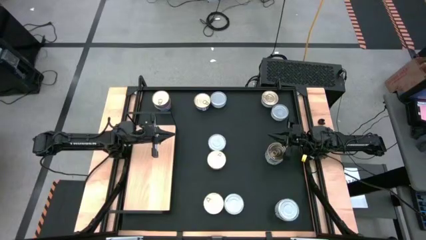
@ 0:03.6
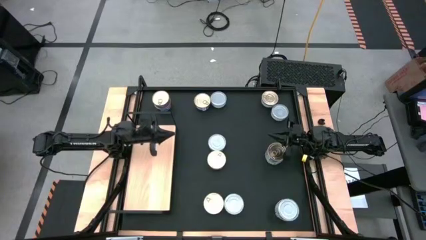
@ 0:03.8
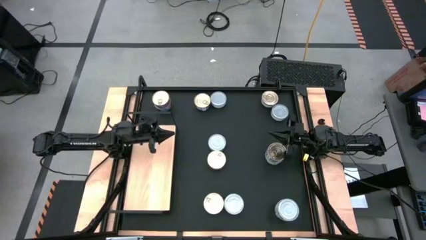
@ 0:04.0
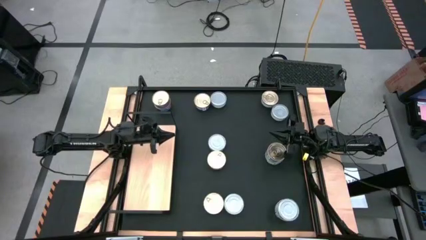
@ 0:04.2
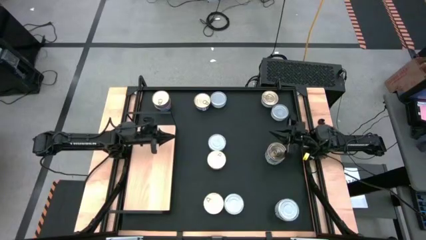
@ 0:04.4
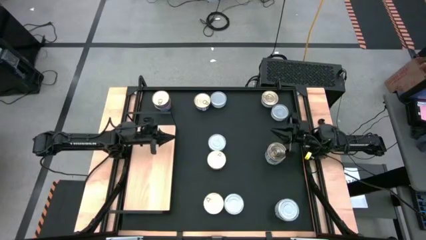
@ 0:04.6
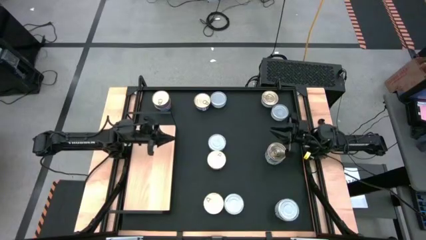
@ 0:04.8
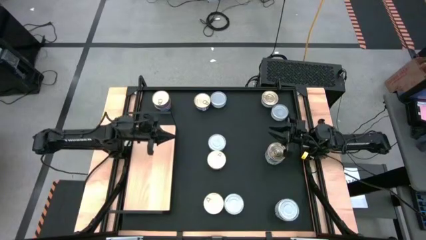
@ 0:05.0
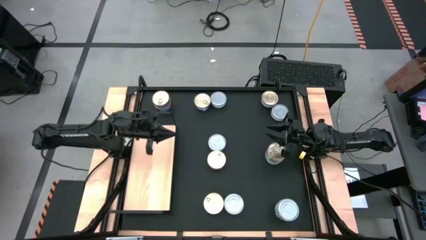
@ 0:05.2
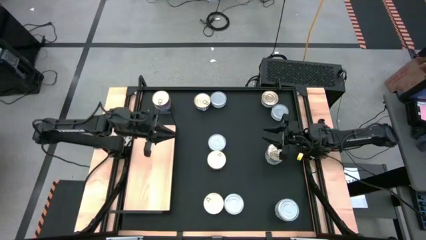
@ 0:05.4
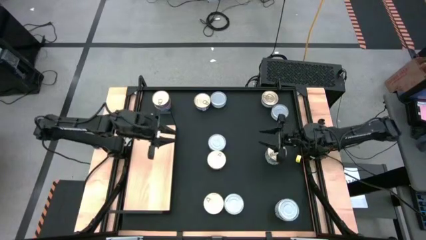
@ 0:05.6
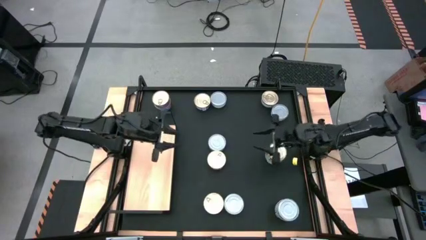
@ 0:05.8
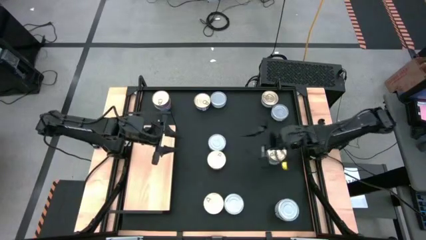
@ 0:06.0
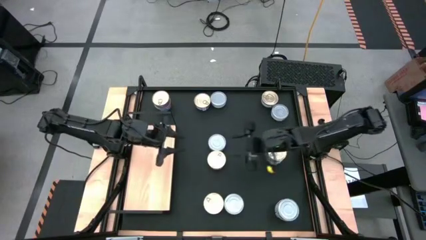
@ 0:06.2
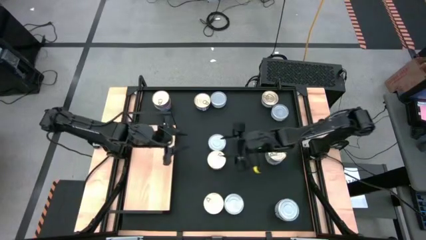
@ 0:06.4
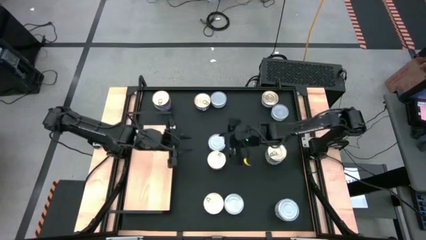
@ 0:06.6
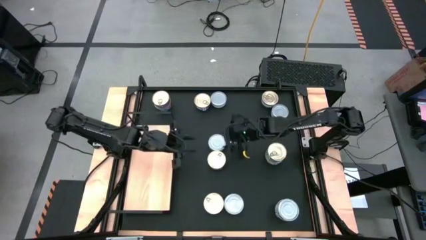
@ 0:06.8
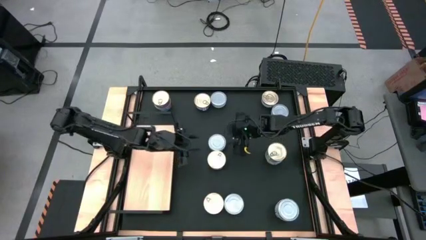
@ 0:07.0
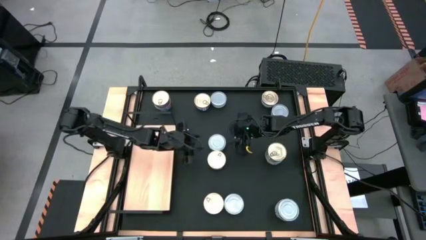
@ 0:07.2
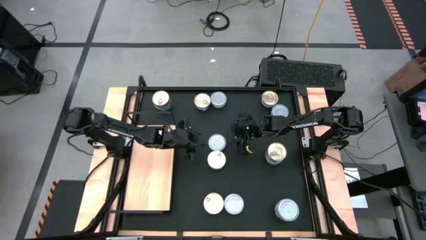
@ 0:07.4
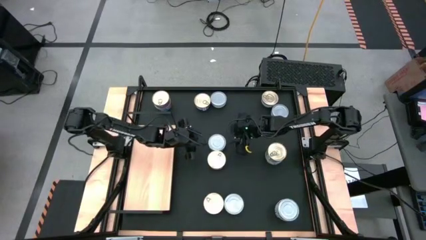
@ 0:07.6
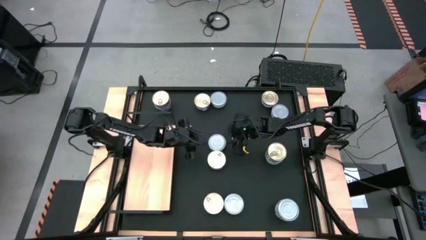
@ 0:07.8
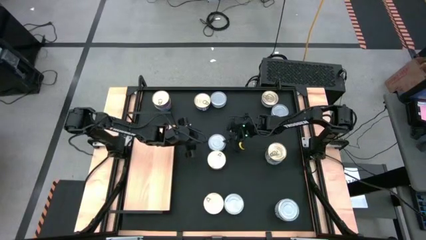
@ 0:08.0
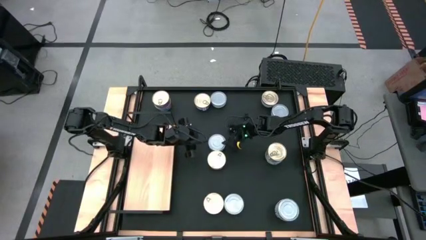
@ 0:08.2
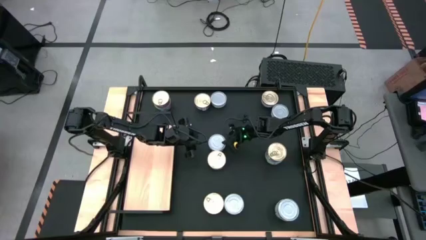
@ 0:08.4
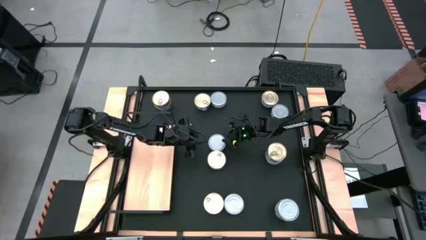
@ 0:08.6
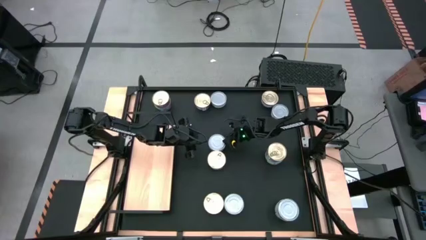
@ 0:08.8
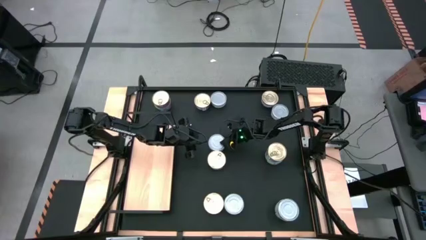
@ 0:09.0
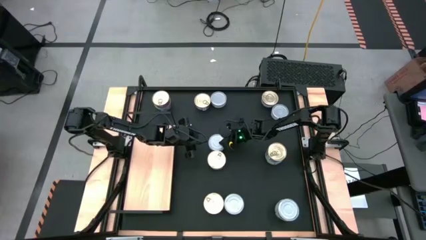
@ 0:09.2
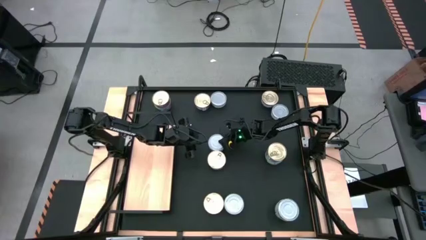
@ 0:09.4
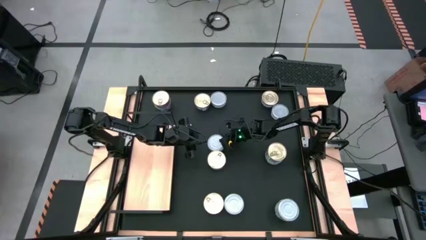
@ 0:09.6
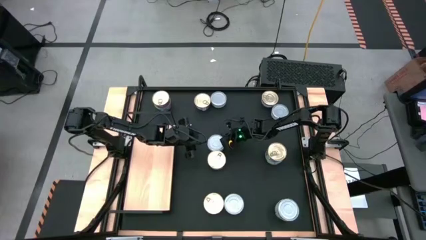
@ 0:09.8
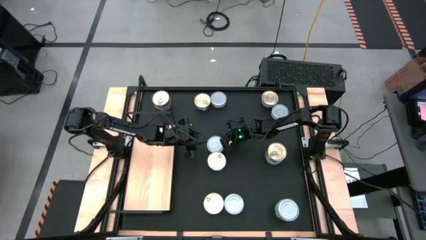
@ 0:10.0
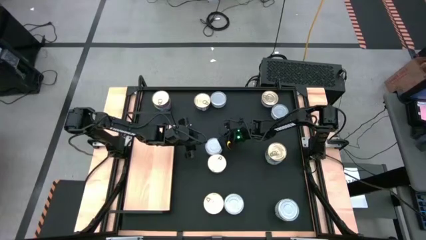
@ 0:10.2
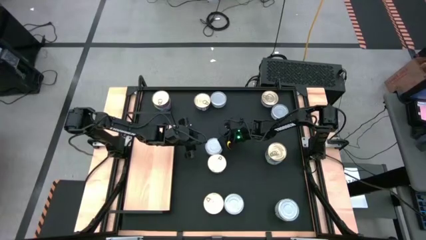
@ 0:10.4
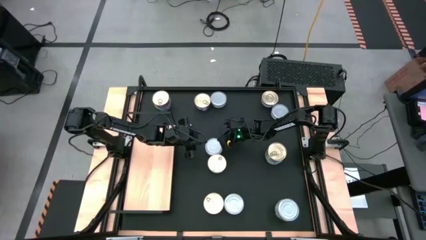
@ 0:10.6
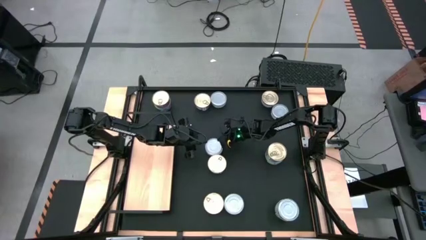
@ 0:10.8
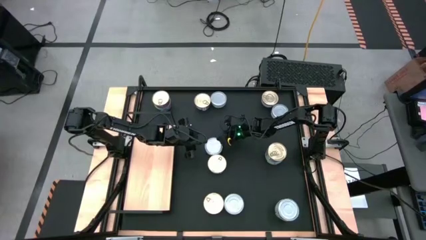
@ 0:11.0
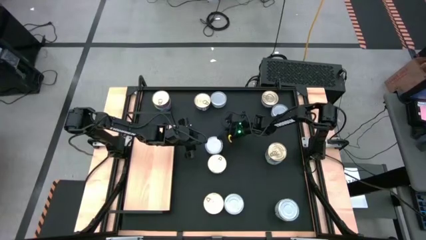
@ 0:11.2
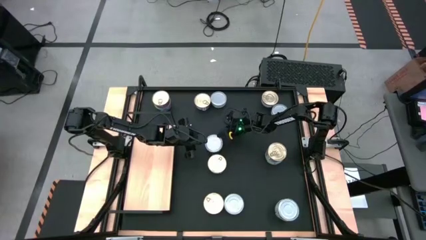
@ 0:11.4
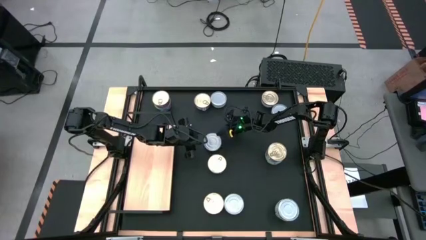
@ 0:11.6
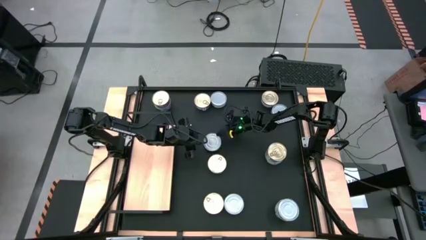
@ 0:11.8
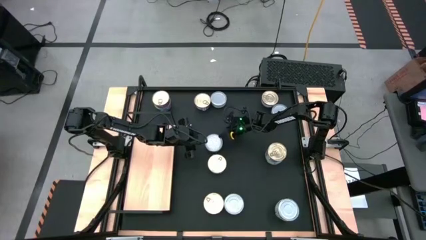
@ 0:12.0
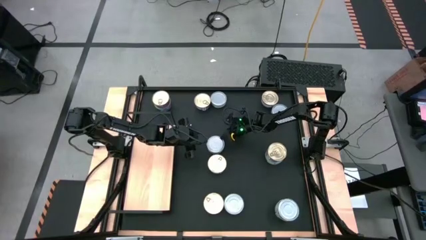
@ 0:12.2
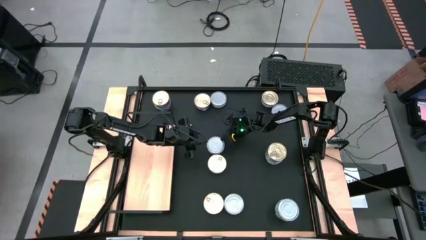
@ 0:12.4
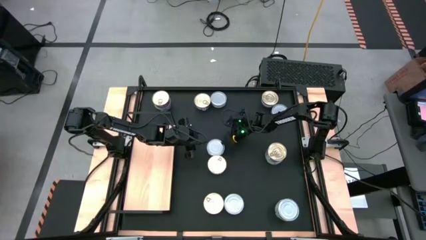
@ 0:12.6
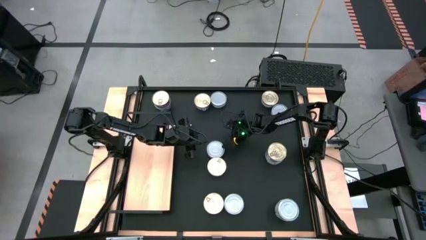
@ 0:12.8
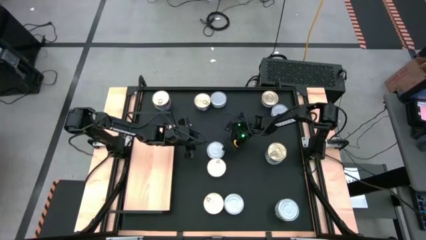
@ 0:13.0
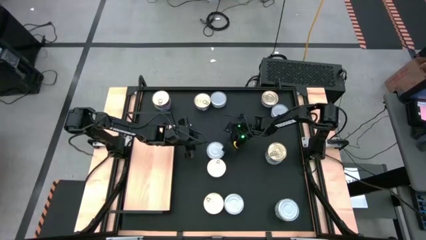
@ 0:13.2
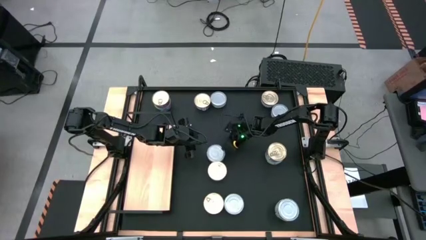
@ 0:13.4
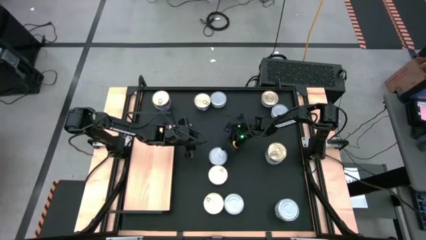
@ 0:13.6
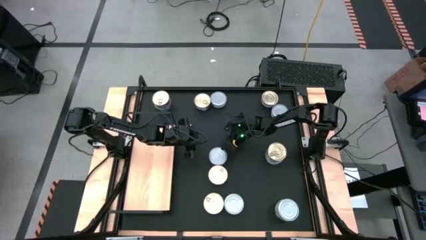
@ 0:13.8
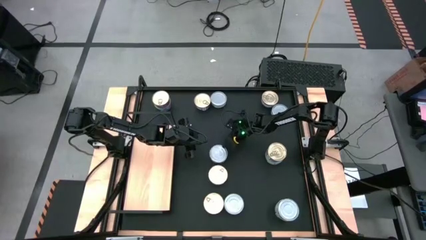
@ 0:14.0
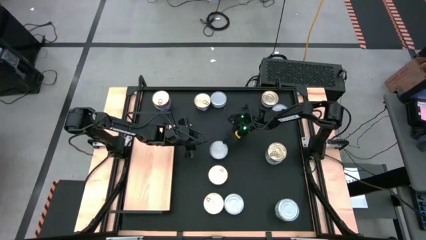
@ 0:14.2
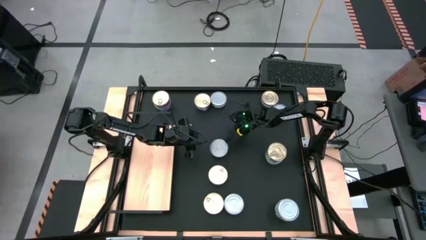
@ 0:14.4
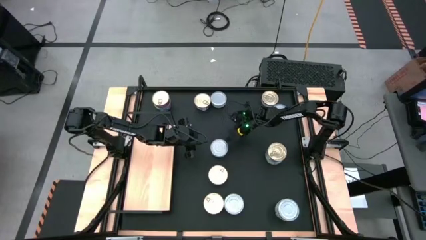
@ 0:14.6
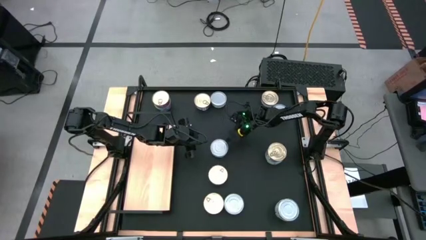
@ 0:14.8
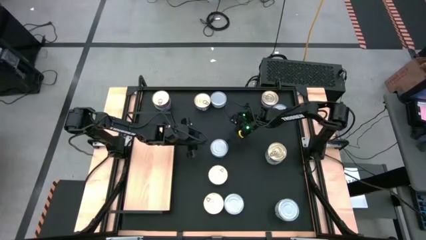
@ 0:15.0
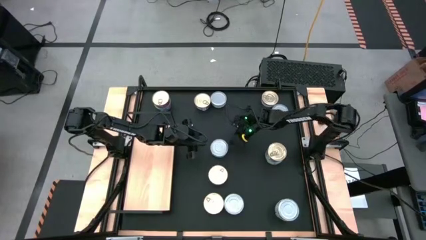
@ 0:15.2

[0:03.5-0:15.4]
Task: Stack canned seafood by type on shelf
Put the green tuna can on the shelf

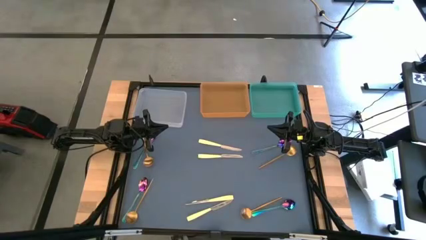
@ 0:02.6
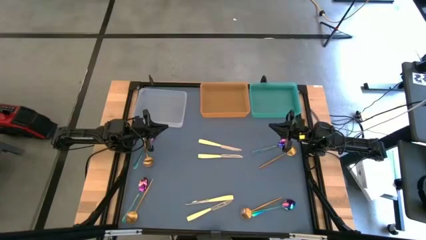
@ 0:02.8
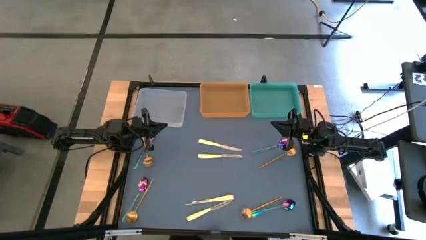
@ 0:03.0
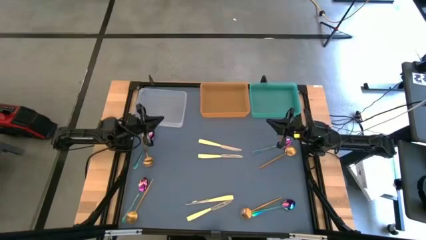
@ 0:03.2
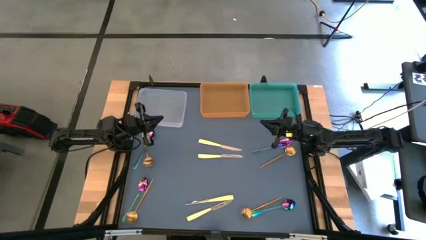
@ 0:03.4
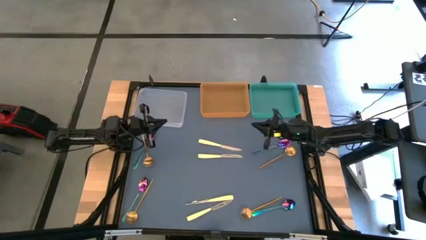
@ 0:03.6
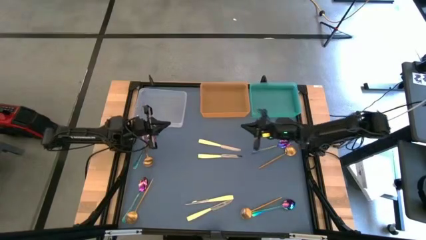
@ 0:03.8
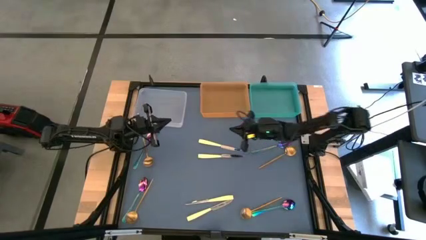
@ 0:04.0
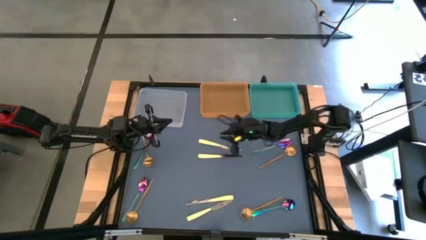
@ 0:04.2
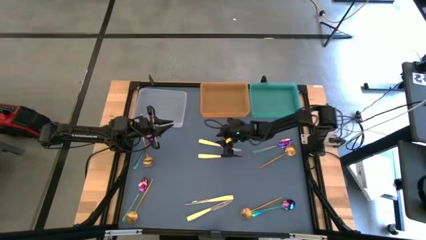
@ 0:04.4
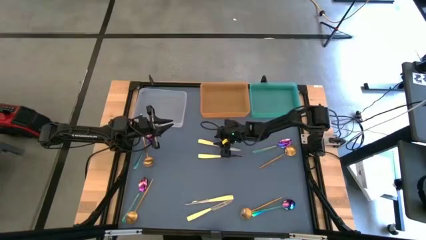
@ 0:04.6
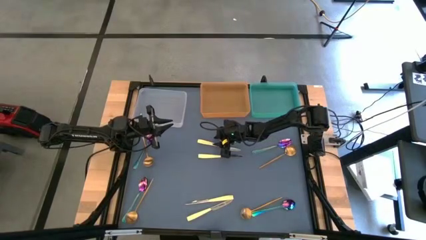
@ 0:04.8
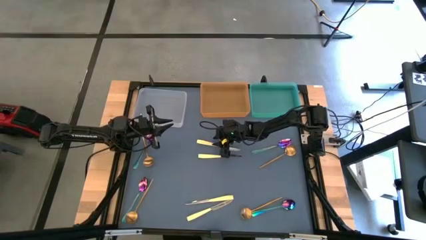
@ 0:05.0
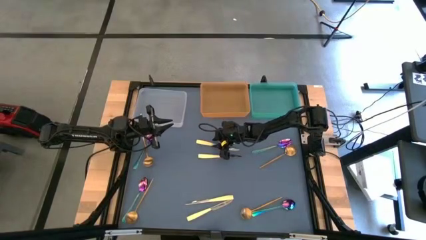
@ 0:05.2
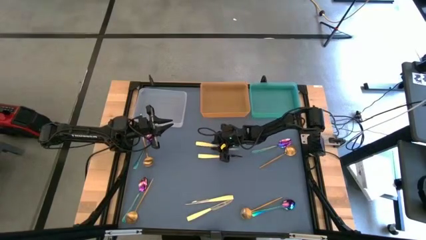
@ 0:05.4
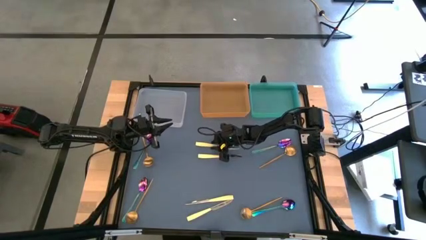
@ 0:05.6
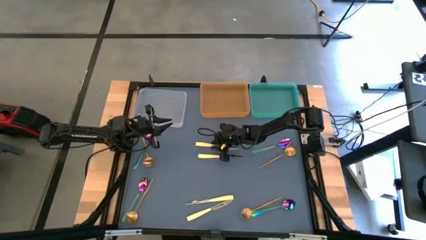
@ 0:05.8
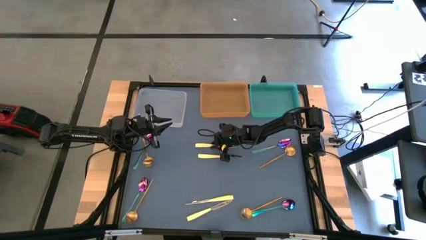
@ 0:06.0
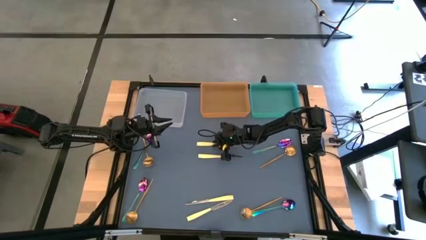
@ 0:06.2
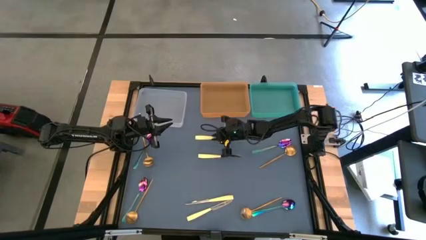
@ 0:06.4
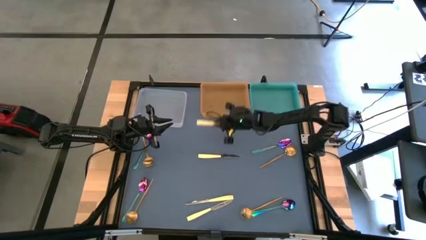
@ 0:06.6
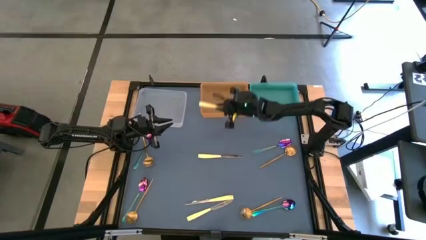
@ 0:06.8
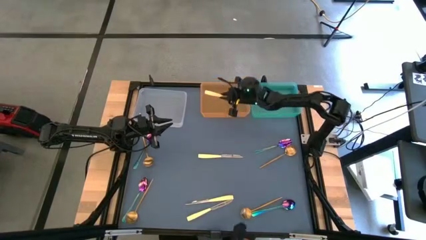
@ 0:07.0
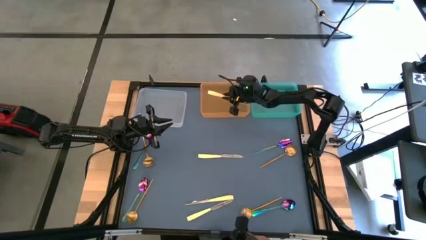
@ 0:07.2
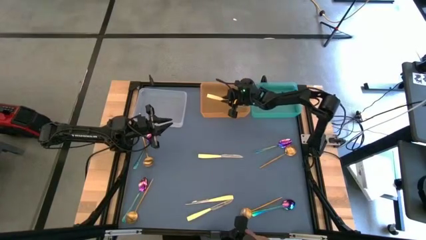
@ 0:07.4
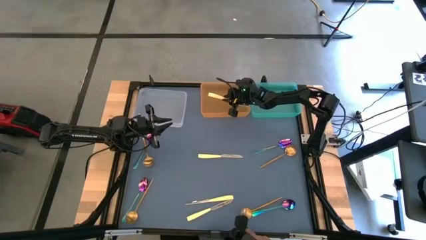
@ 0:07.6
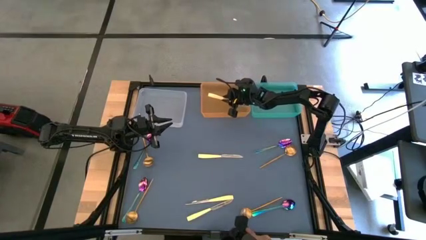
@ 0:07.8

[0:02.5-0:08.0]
Task: Sort silverware by color (type)
Put the yellow table knife into the orange bin
